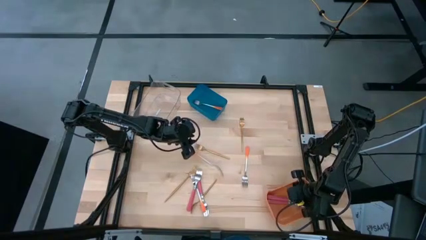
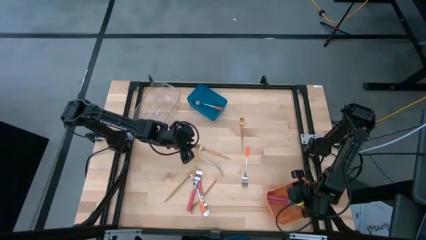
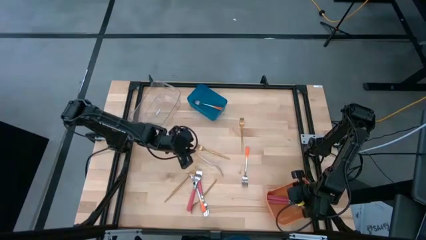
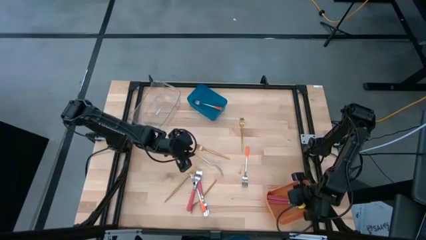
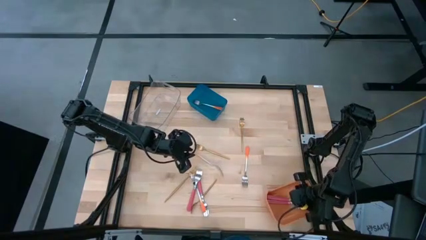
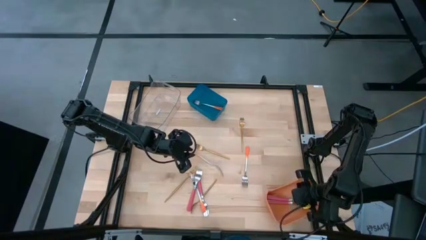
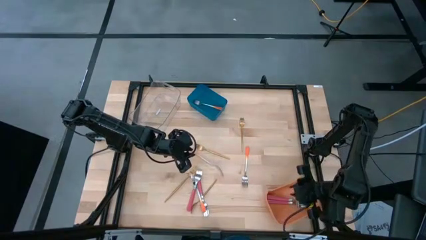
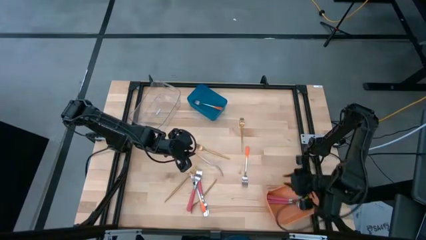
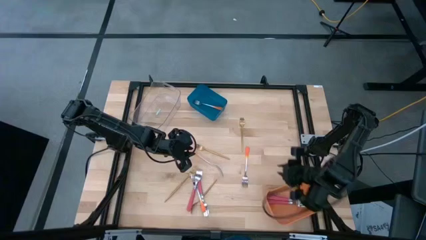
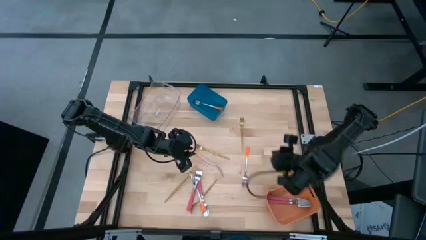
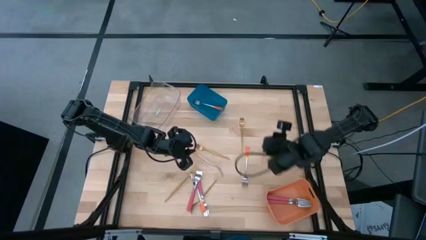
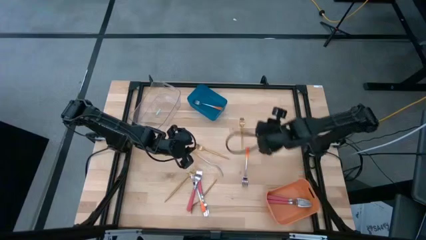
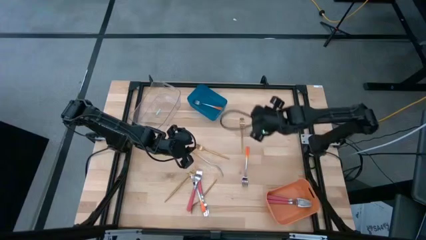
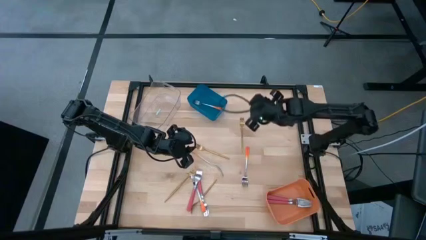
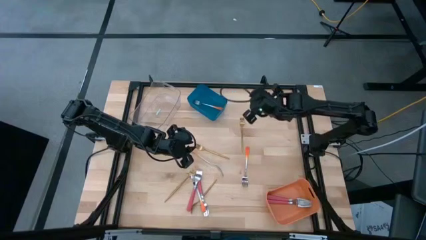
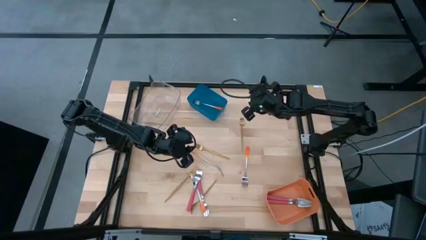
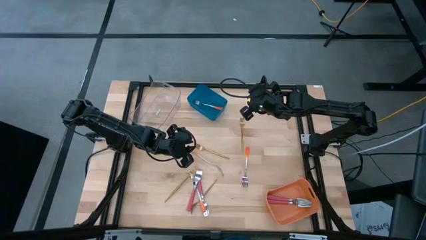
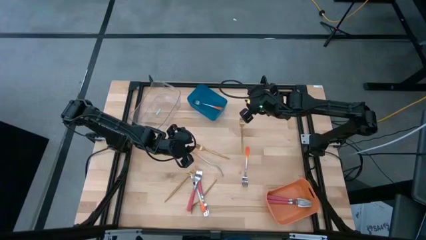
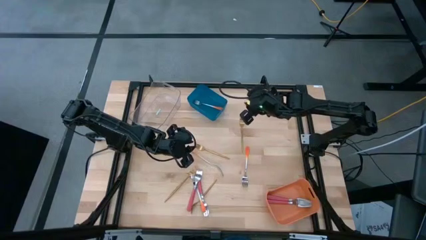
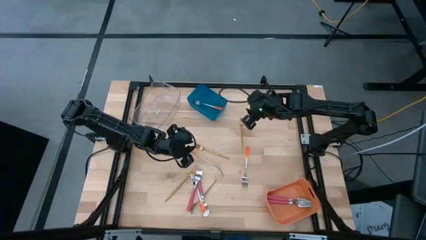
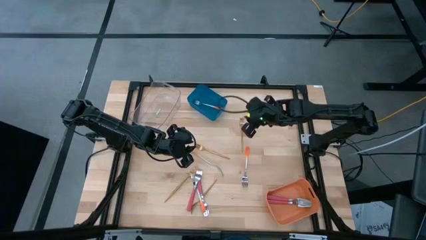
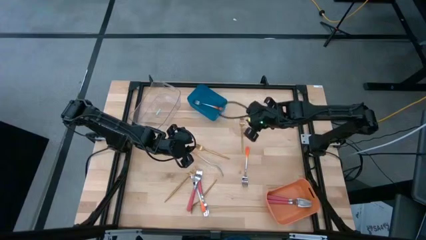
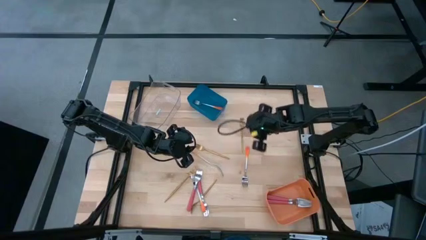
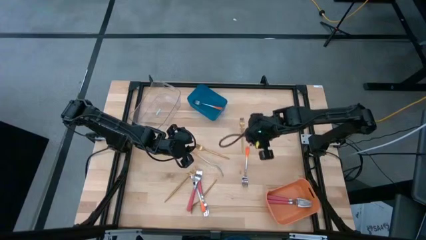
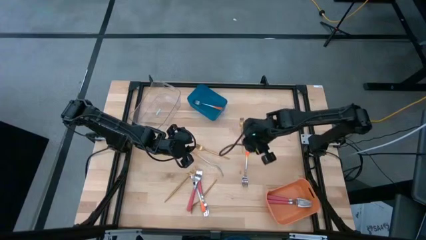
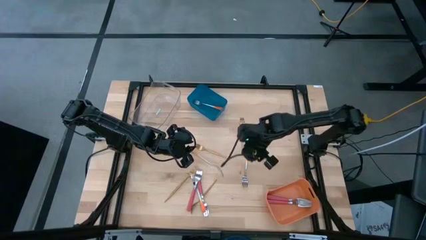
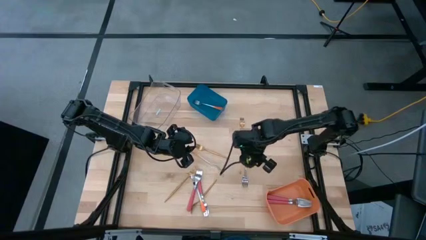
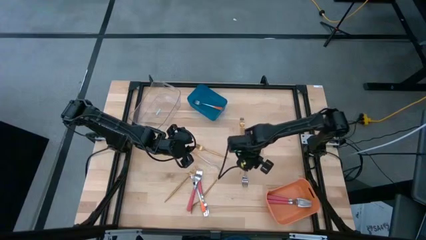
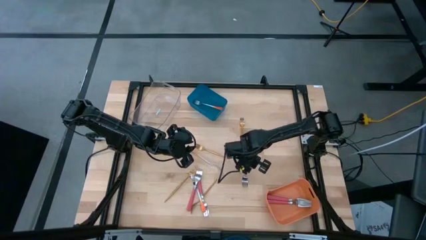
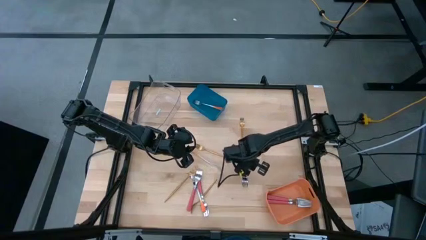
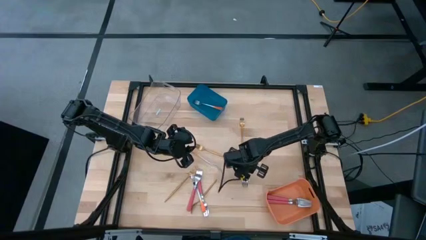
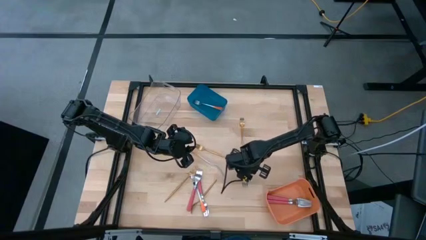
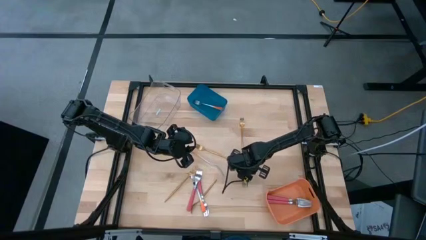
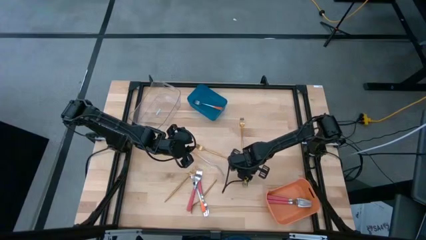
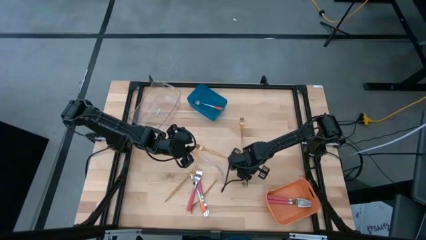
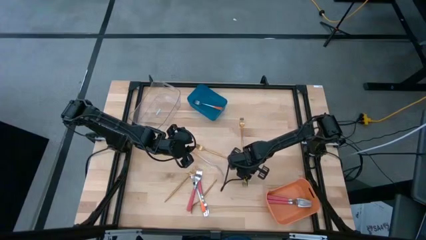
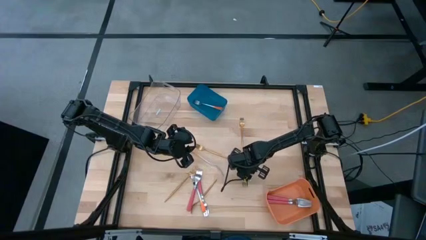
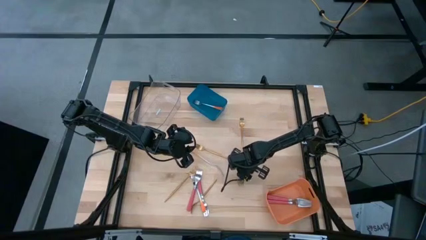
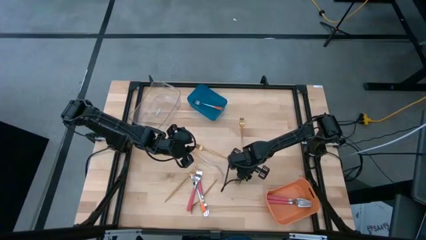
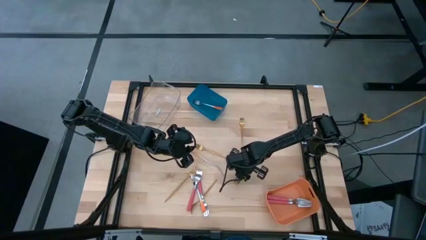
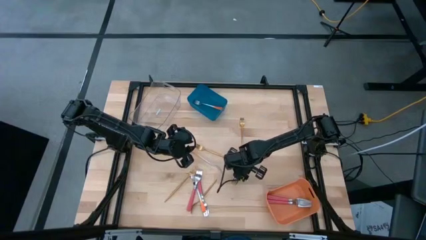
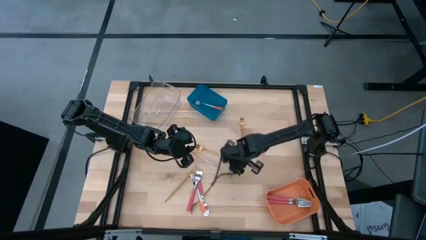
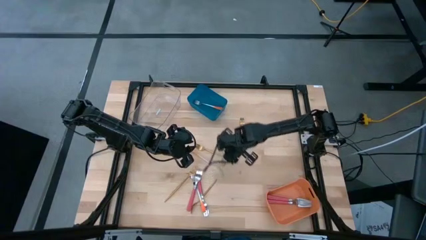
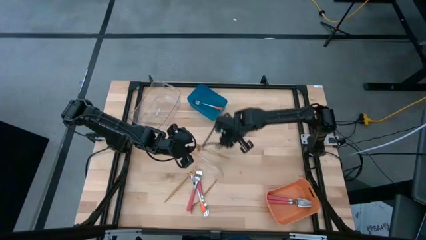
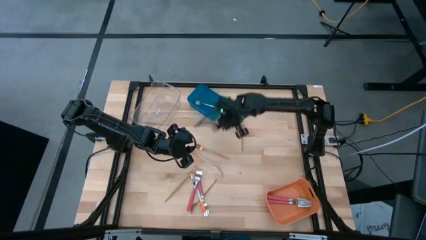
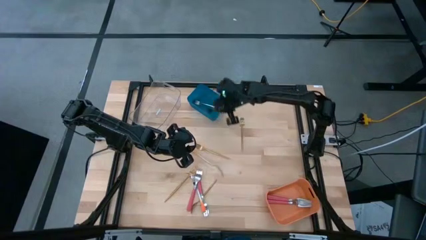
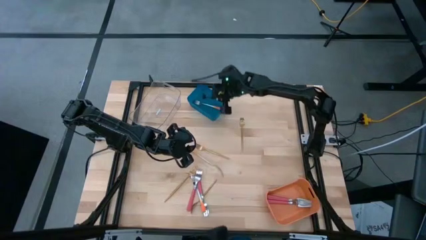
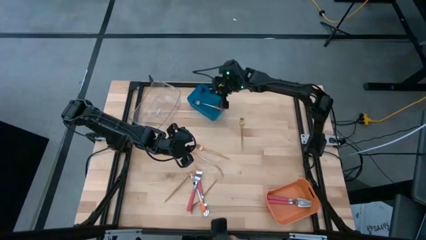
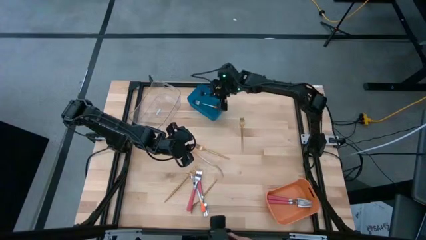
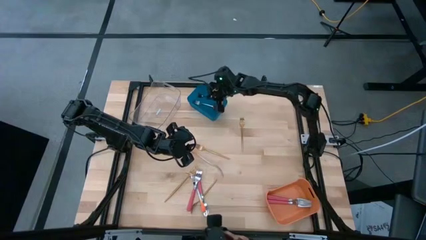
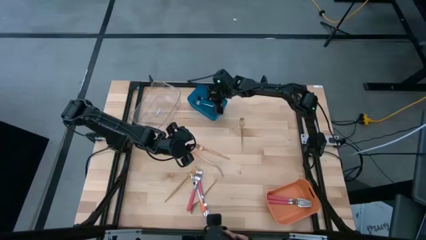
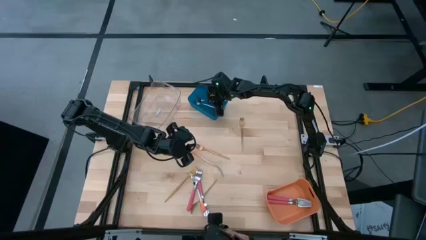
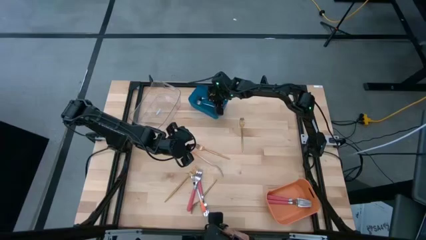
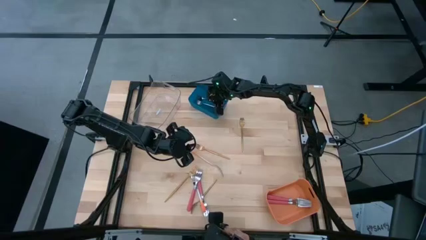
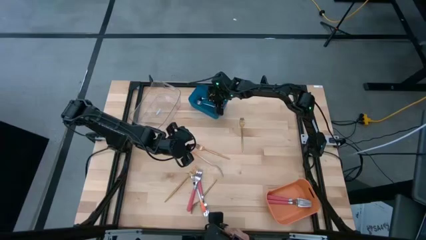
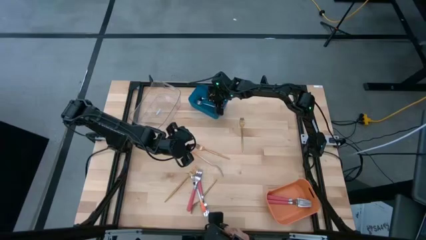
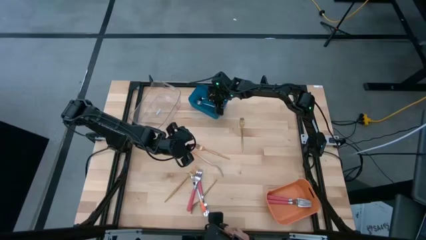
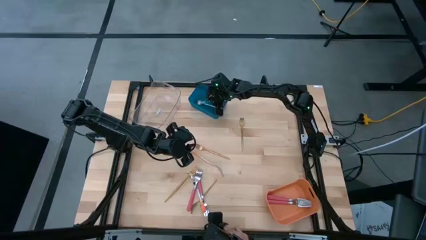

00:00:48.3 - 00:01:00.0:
Task: Sort silverware by color (type)
Put the orange fork into the blue bin
